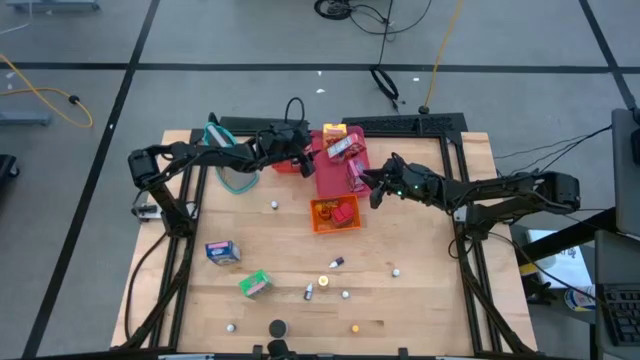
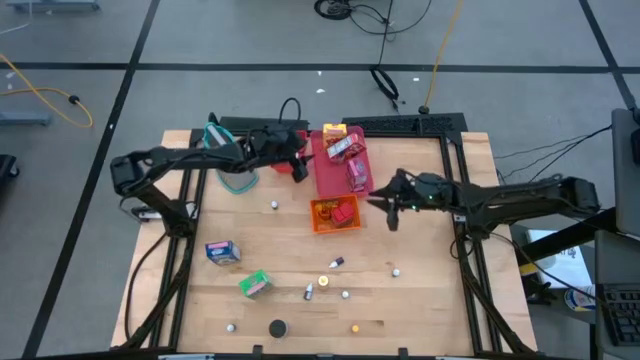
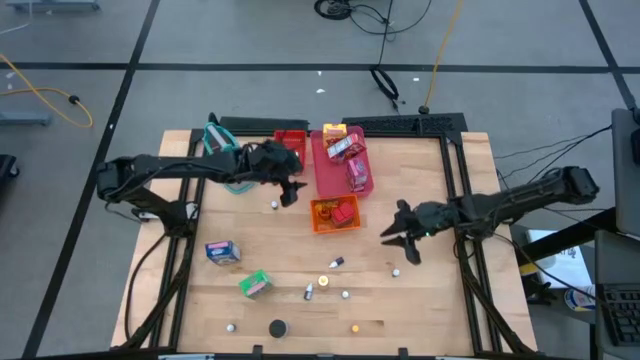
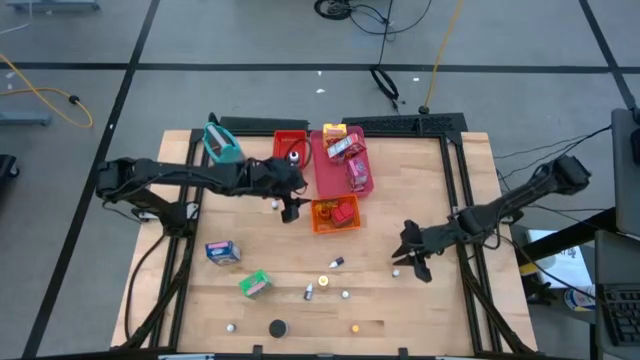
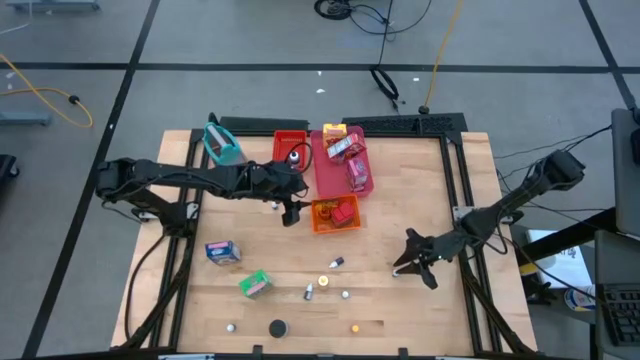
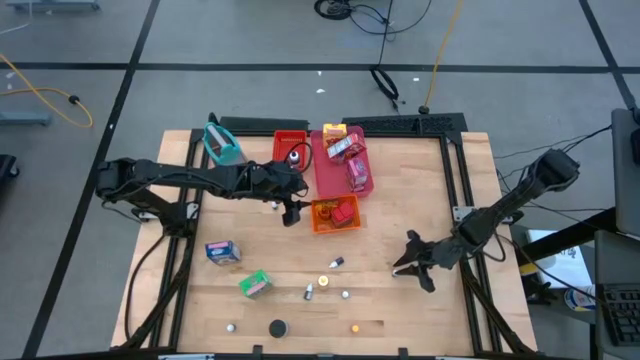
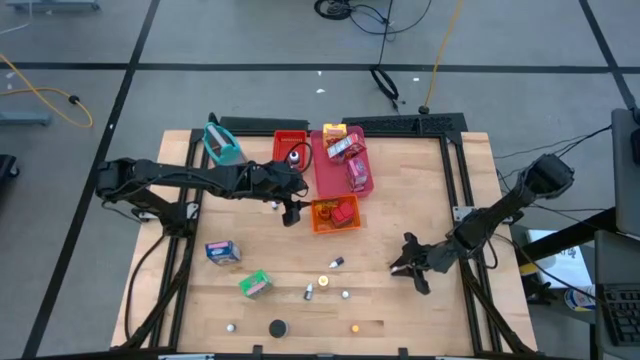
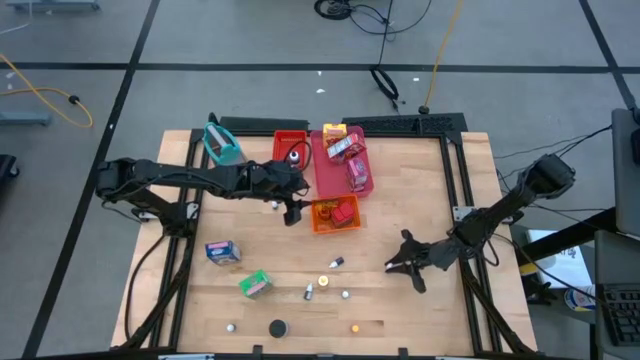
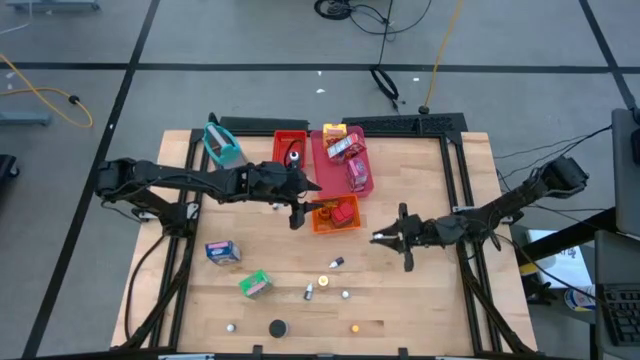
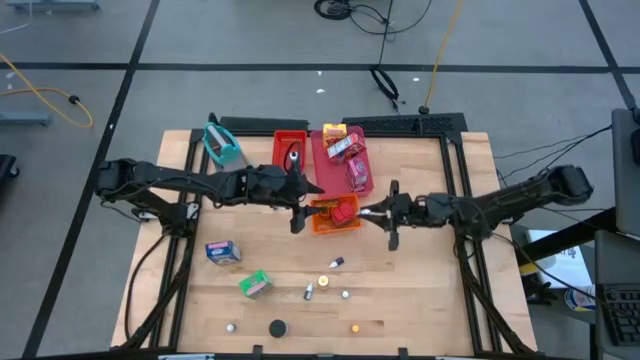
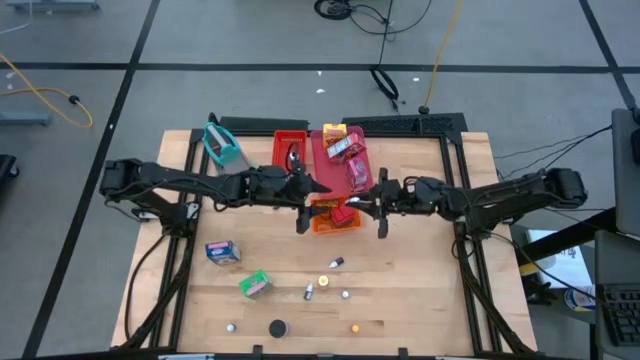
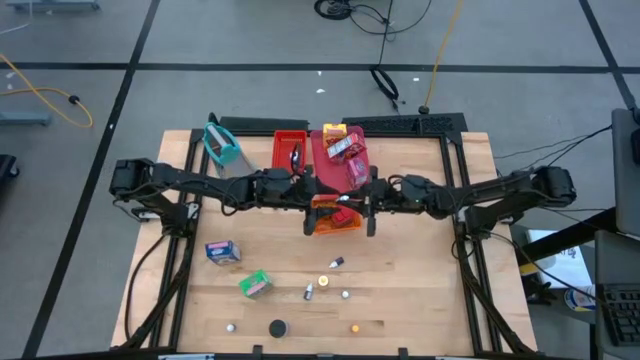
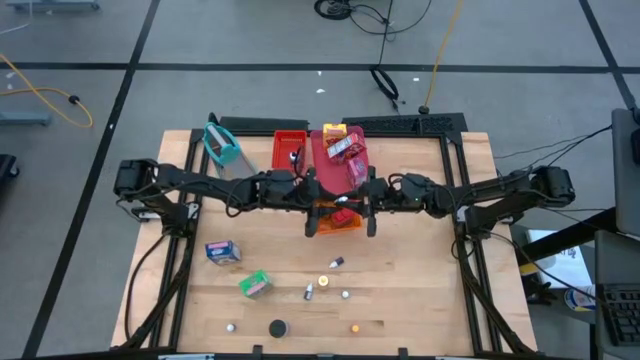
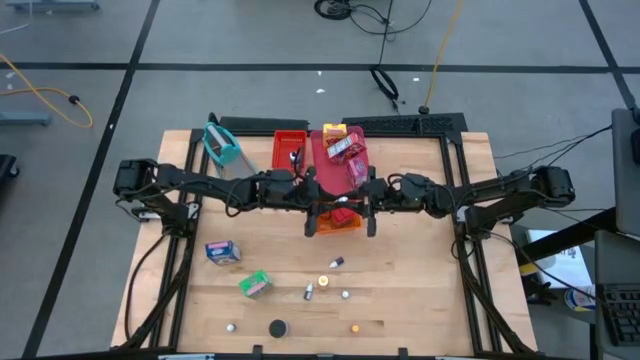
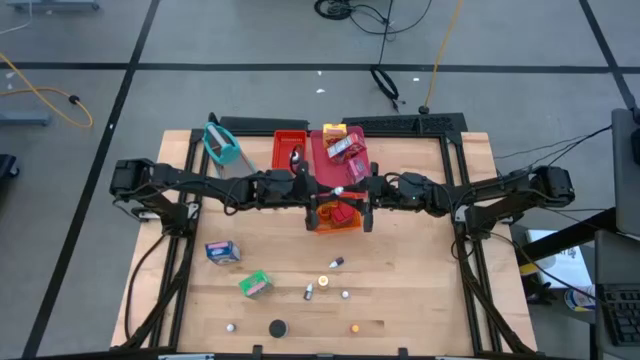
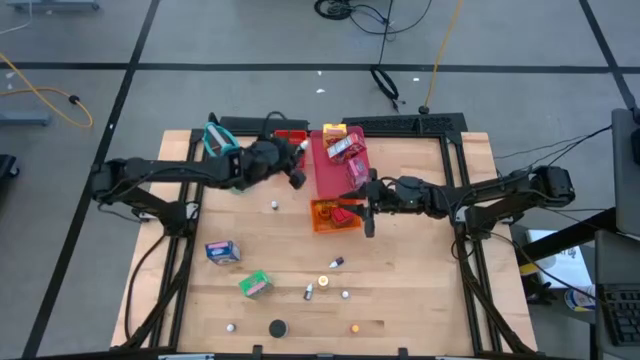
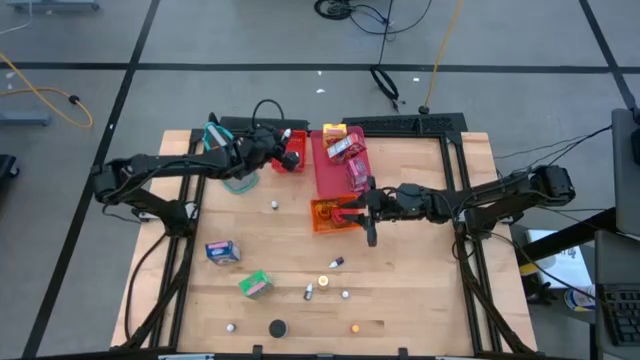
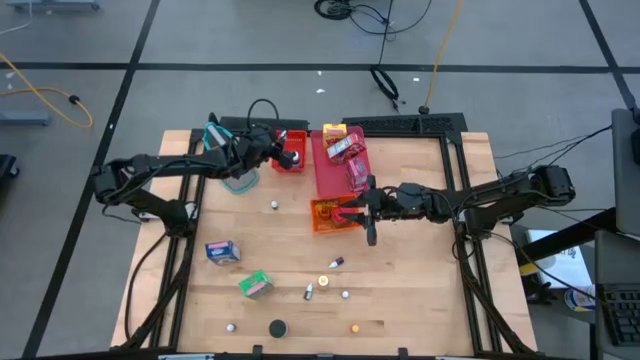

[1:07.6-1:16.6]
Task: Pick & Place Kitchen Items
Put the right red food coloring bottle into the red bin

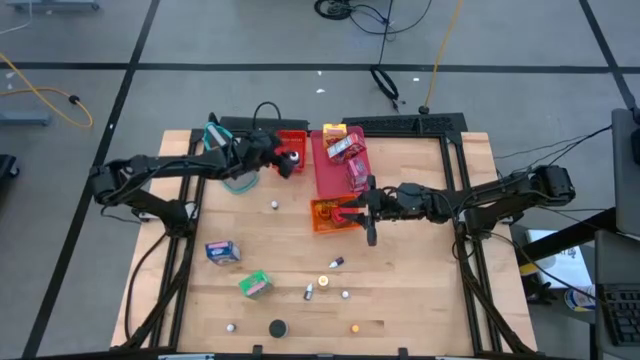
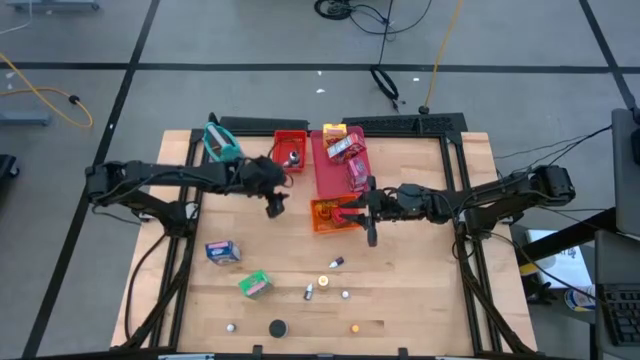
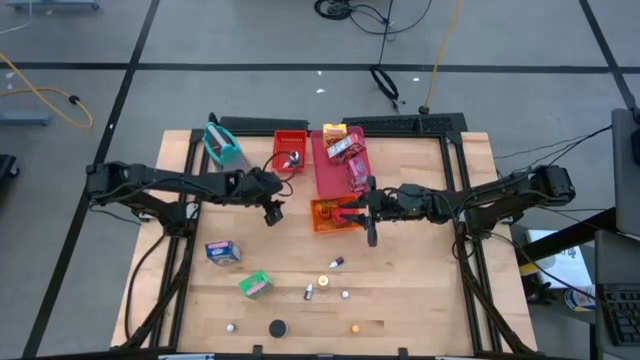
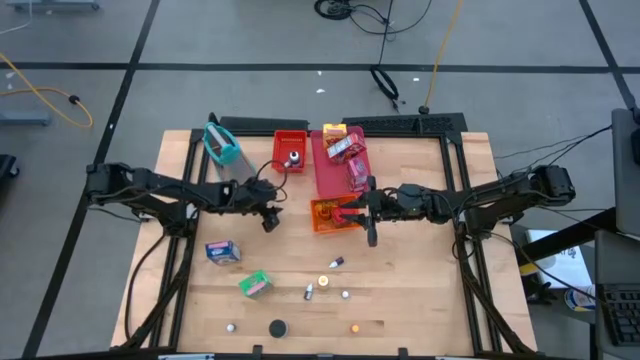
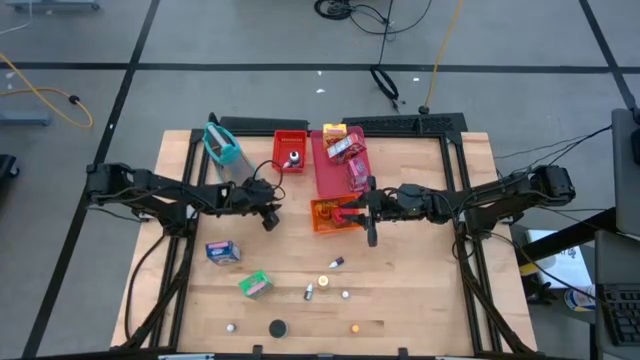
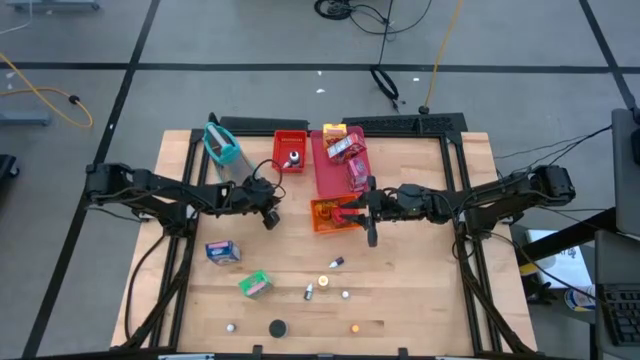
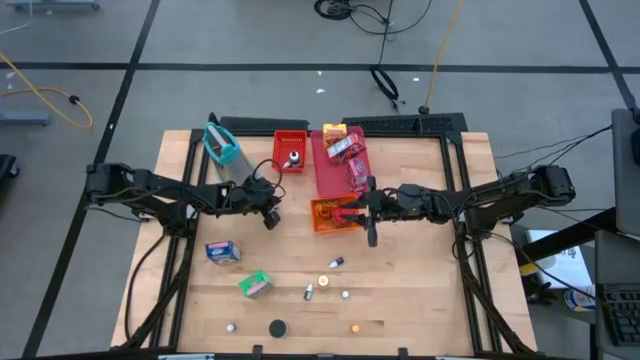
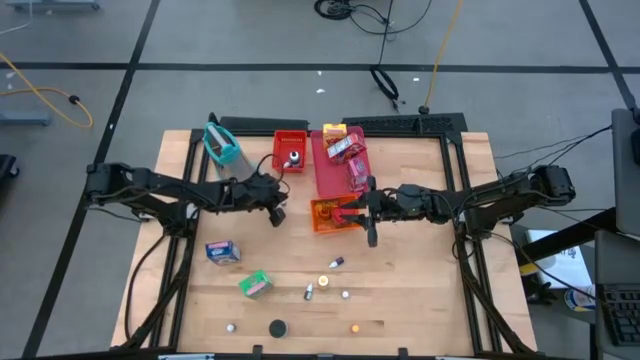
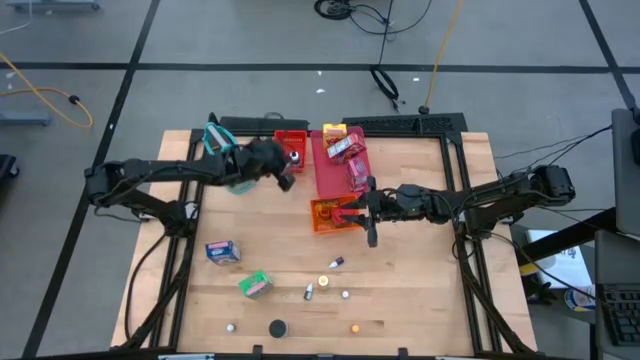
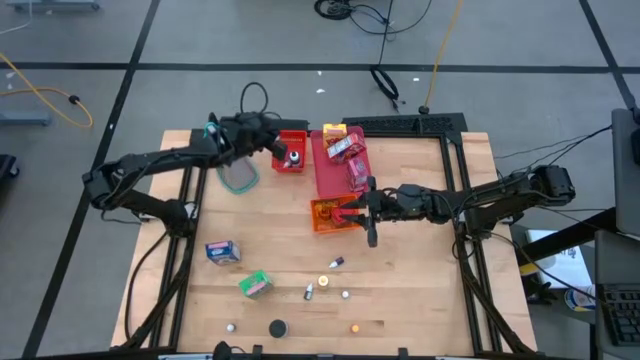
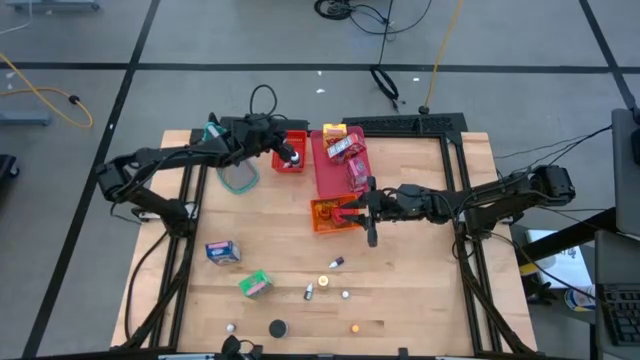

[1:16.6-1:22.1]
Put the green food coloring bottle into the red bin

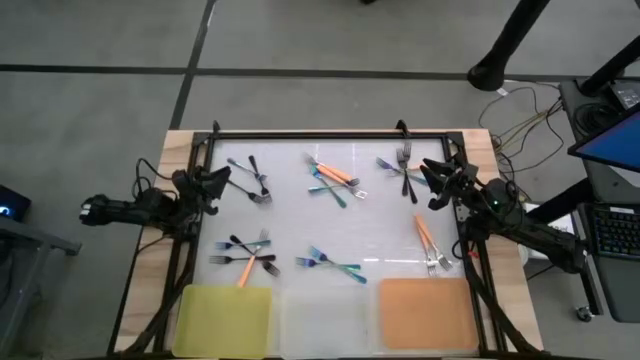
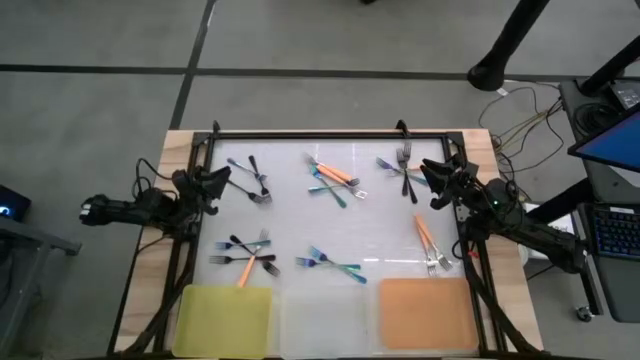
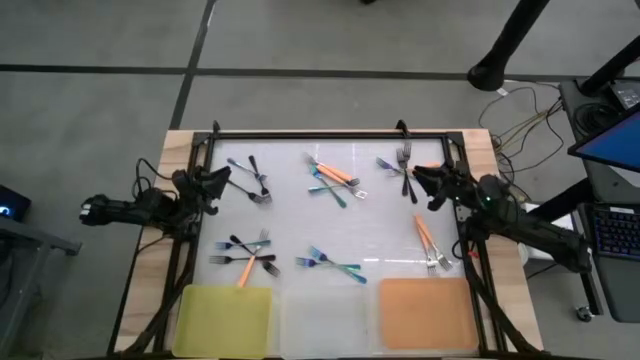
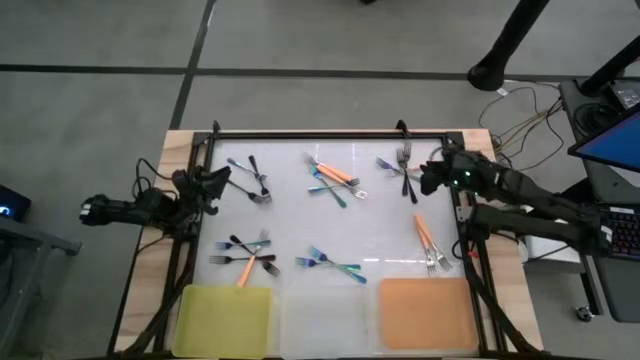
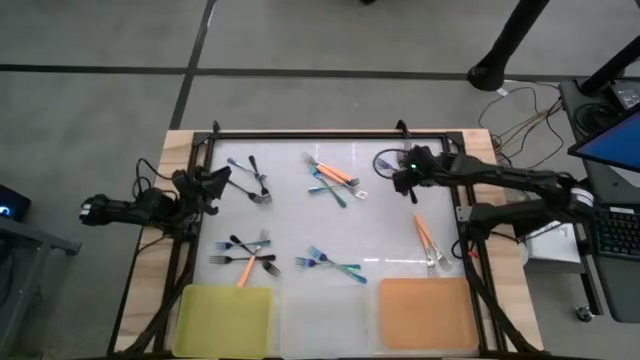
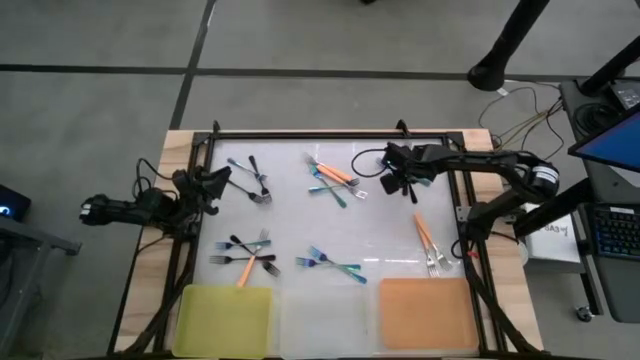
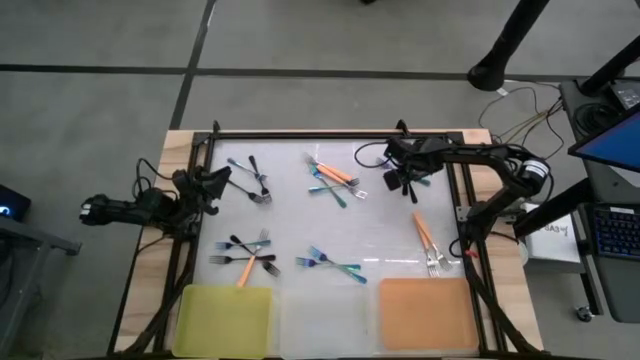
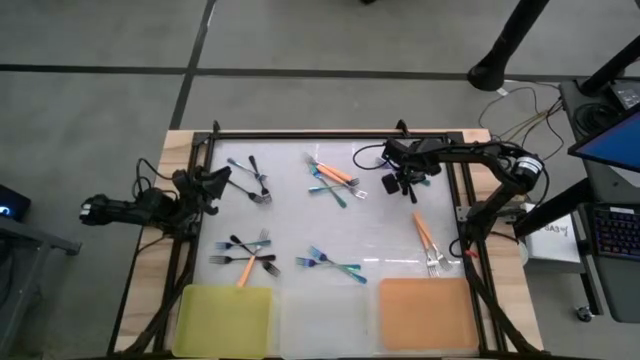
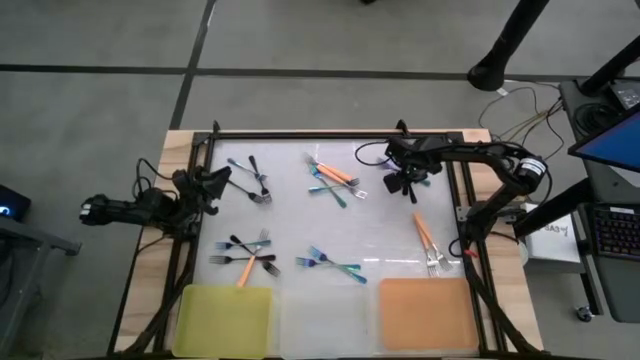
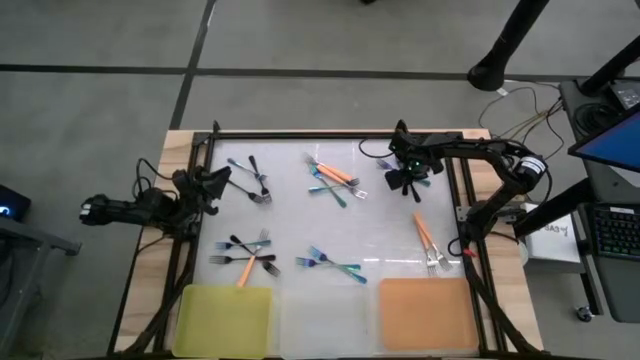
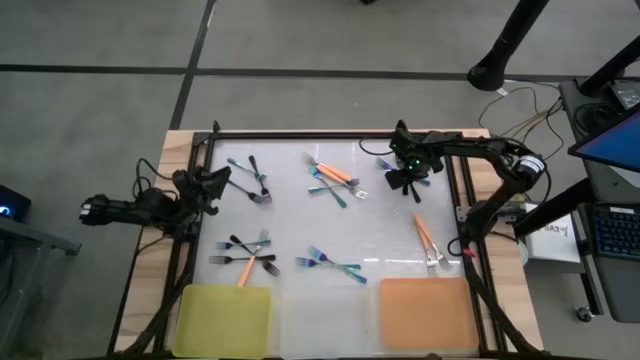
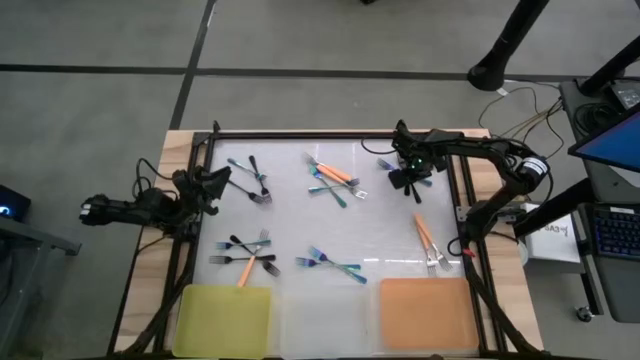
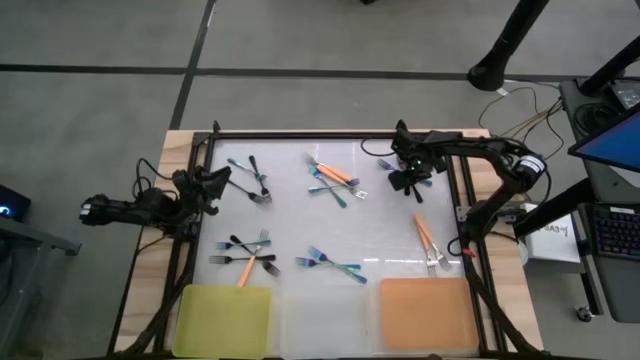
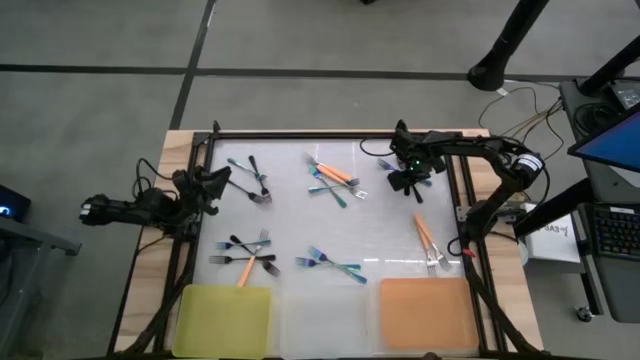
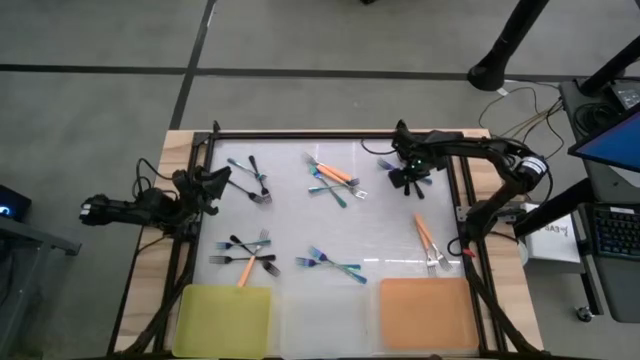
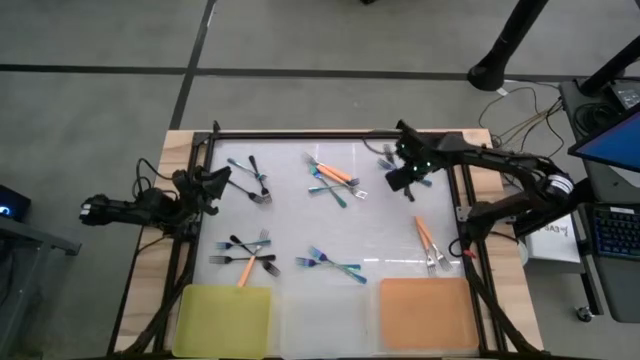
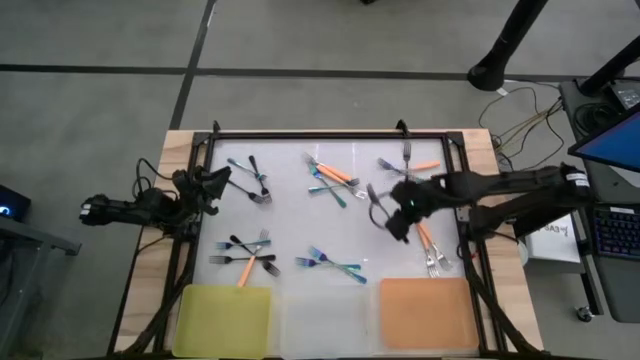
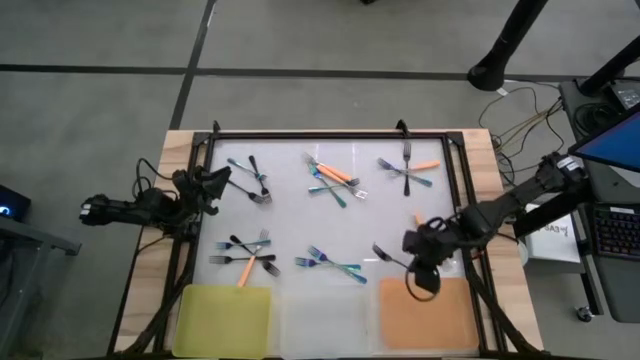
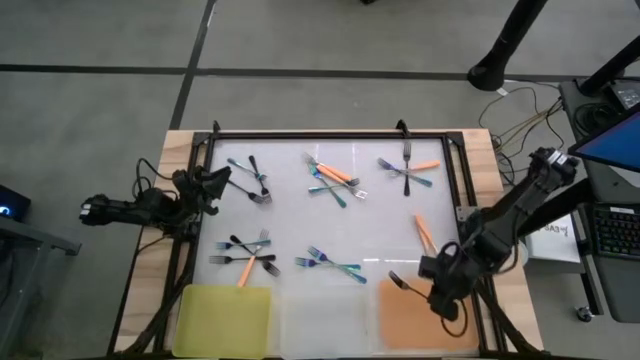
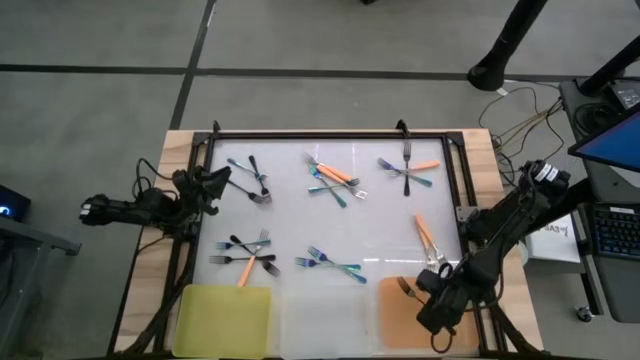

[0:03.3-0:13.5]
Task: Sort silverware by color (type)
Put the black fork into the orange bin
